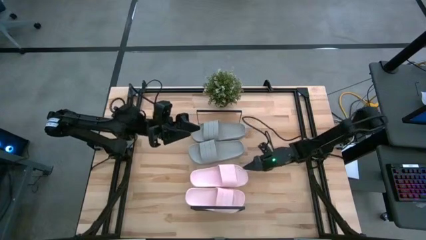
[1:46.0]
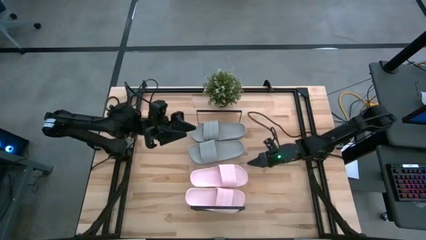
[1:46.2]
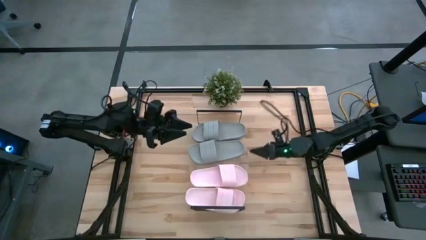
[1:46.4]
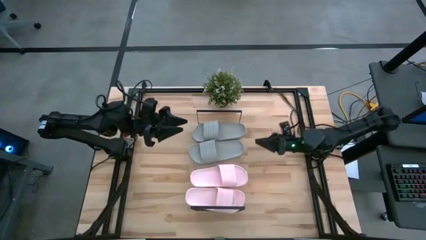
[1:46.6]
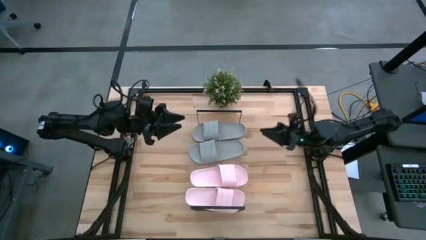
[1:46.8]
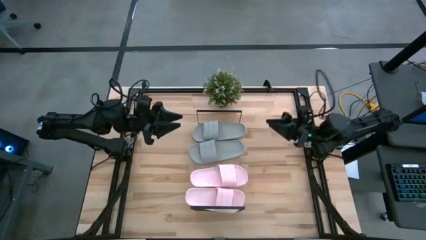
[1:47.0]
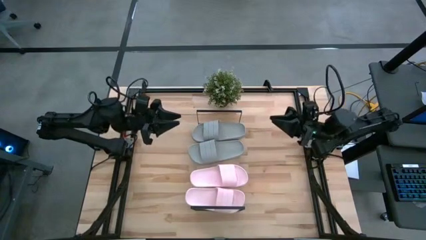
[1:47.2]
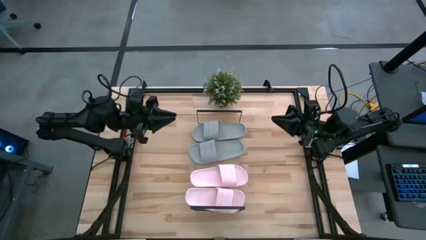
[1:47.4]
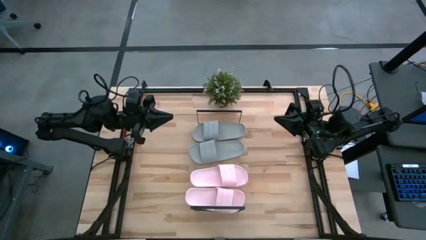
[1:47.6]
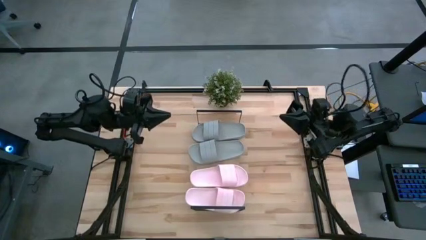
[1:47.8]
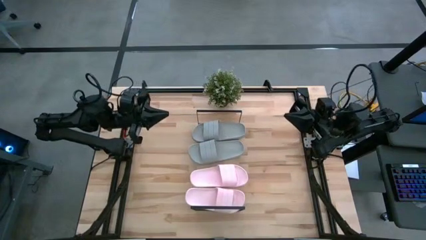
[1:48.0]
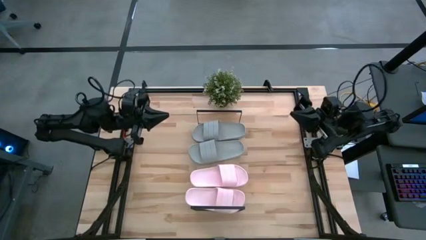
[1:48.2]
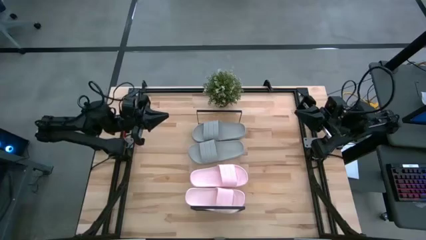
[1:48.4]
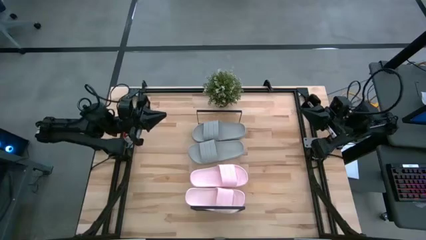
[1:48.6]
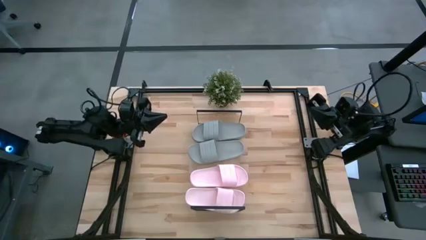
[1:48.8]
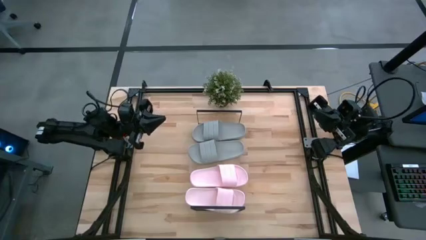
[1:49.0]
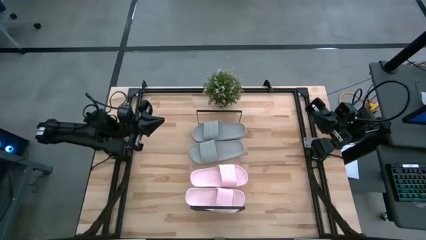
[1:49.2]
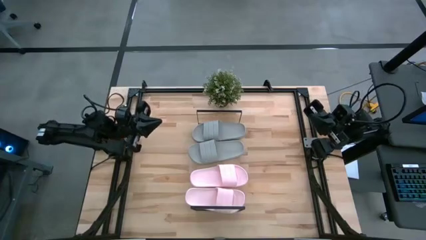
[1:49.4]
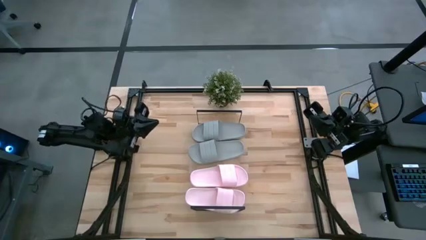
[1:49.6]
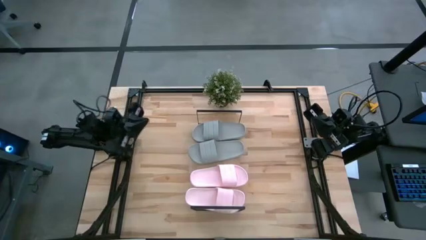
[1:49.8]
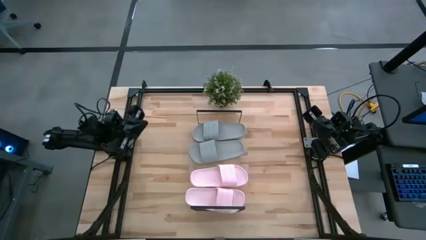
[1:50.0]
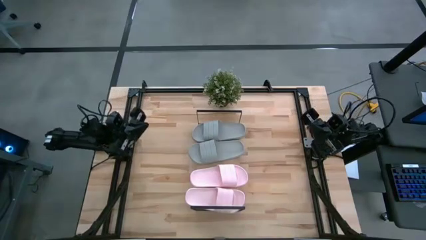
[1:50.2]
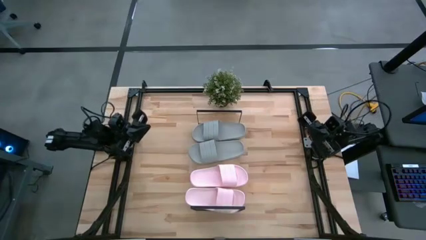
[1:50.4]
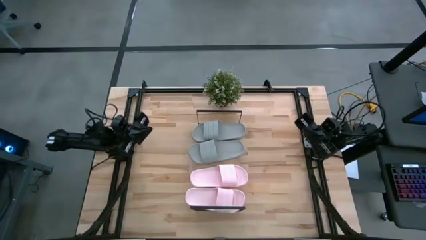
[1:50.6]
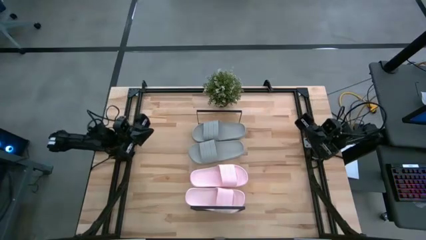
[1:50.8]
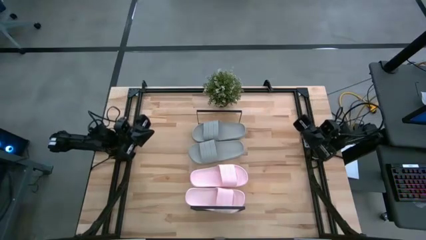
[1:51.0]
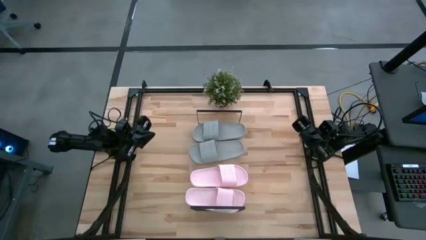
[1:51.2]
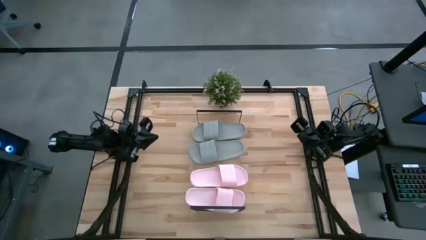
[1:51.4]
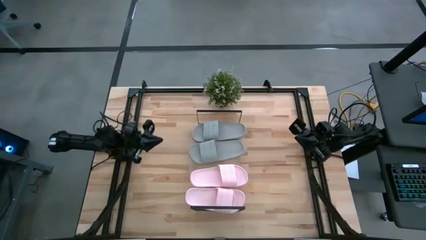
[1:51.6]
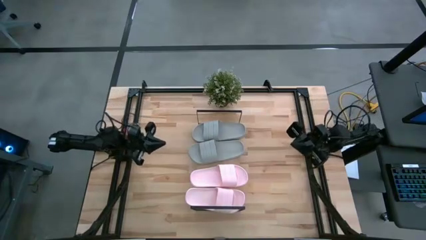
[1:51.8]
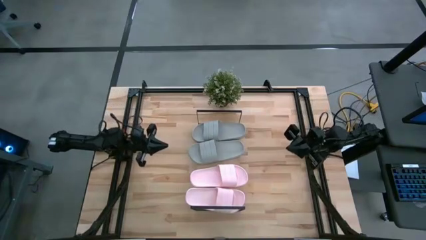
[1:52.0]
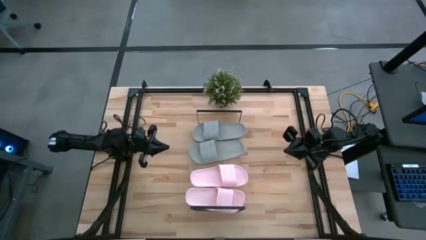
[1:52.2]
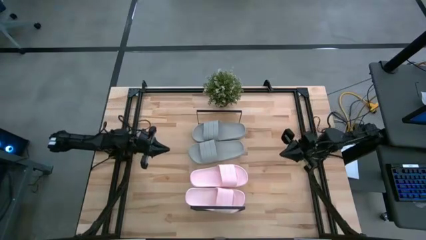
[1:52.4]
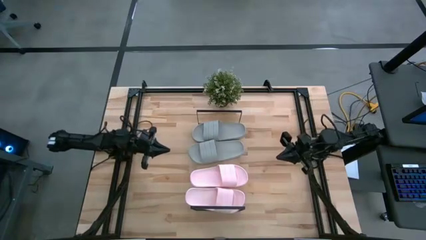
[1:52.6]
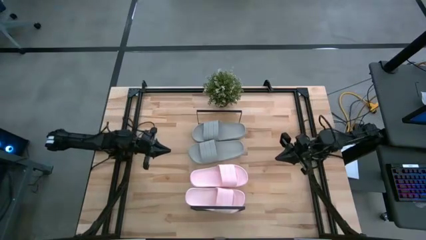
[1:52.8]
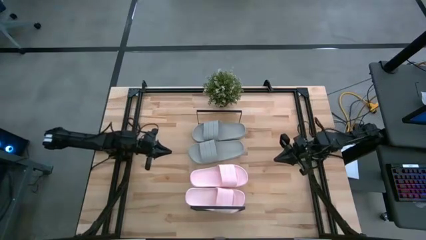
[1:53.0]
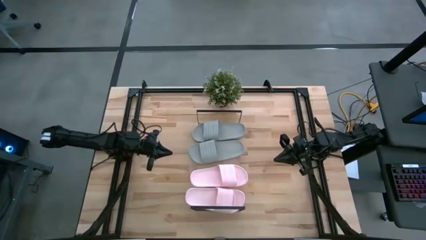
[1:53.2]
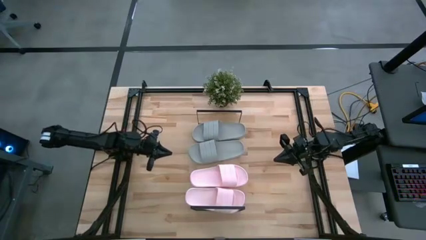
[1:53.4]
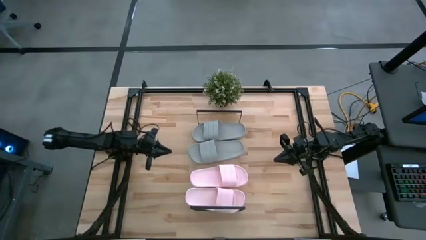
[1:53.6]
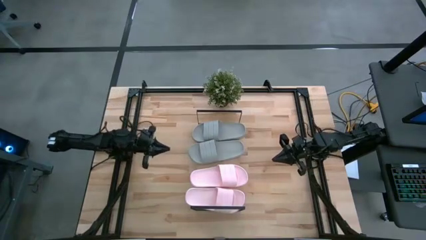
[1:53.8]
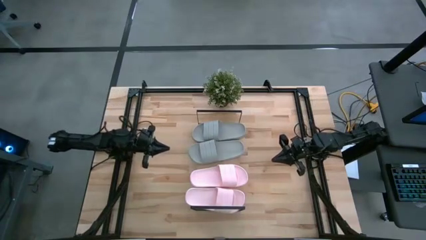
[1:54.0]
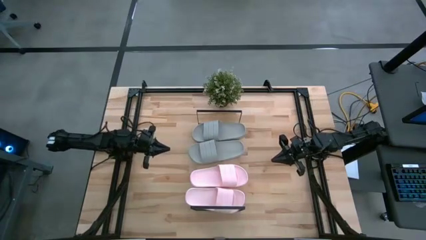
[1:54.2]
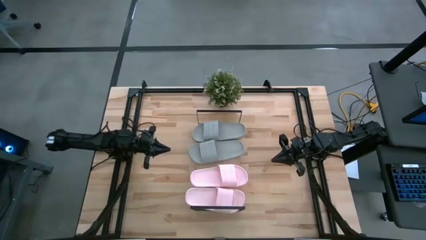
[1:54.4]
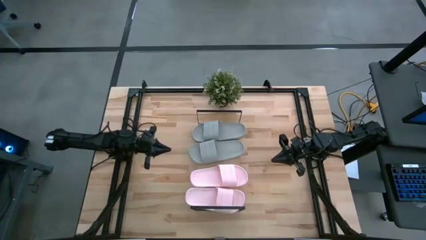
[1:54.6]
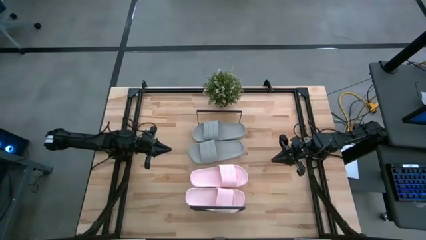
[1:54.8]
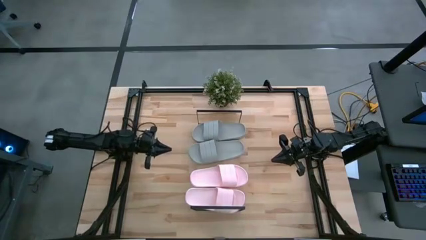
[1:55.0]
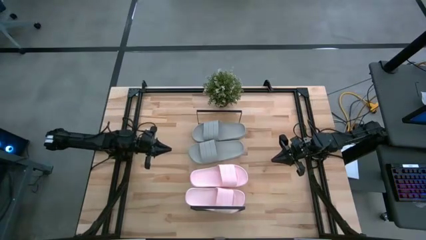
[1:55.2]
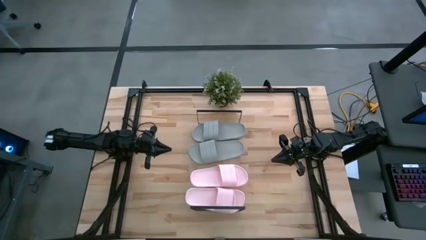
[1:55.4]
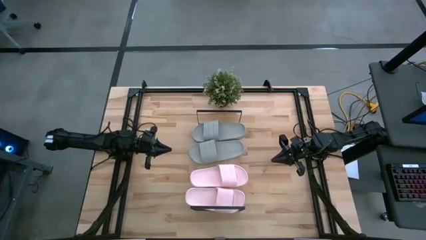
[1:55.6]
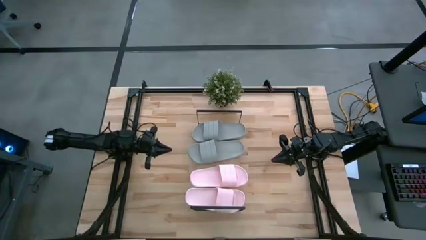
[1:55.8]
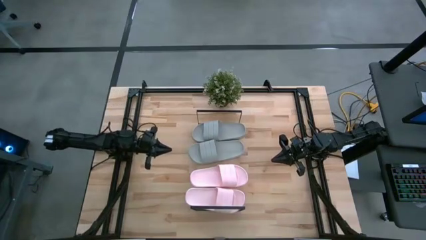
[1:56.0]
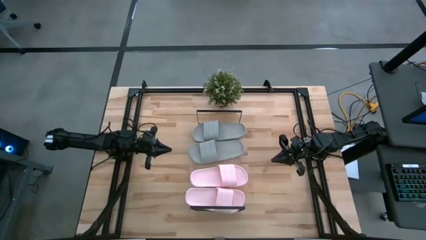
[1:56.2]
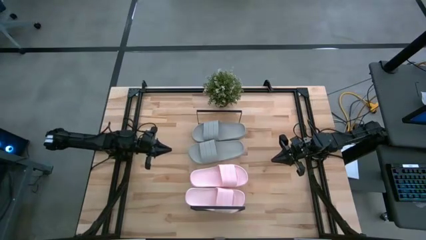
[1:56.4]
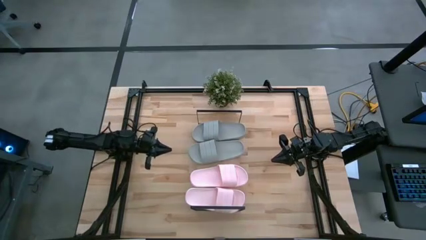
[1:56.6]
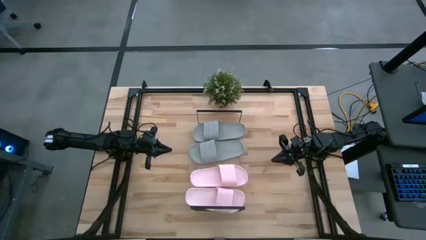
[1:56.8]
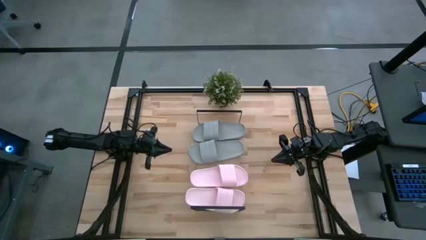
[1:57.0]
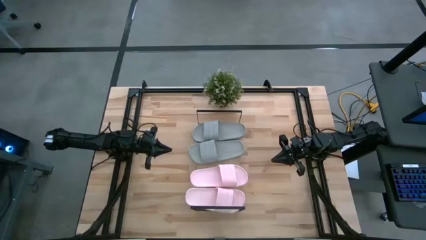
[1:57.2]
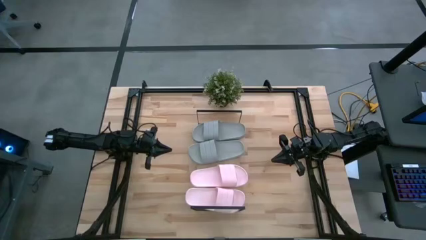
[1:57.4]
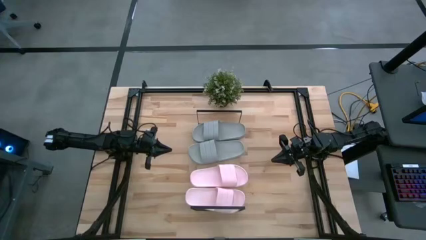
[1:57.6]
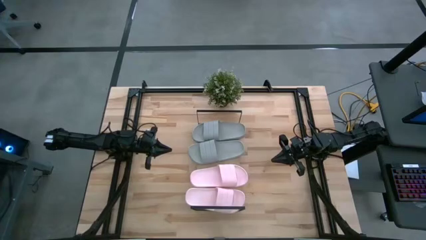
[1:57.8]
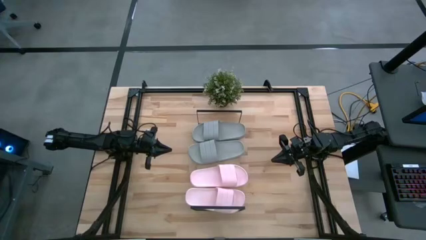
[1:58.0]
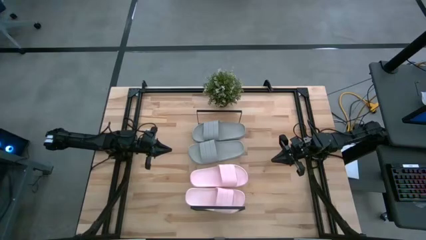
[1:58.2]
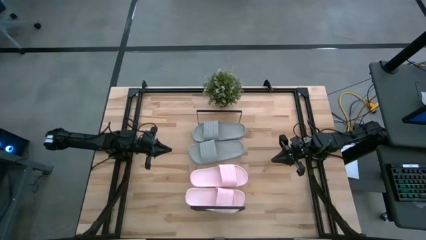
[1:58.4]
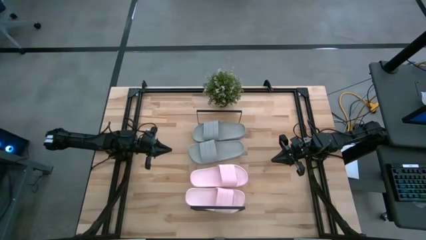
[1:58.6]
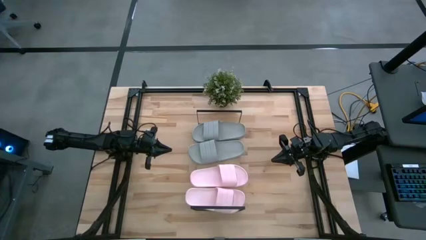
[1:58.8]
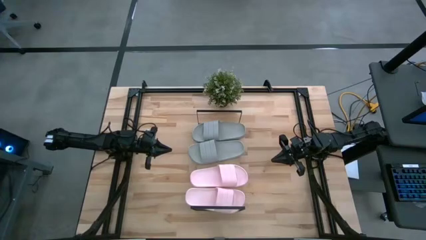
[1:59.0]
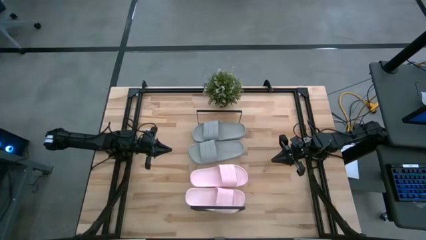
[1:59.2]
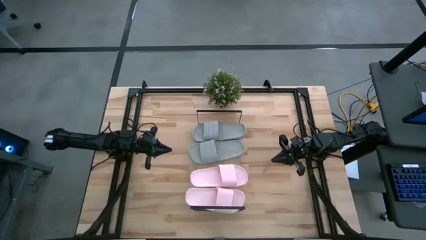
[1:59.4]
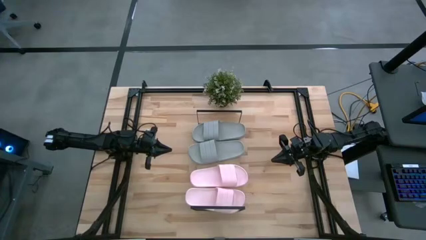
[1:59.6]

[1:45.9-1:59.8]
Task: Pick and place slides into the shelf
Return to Home Position

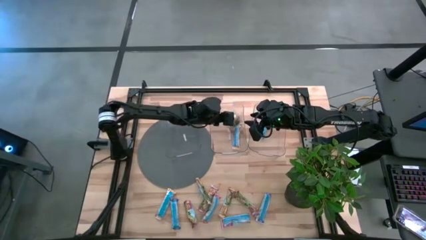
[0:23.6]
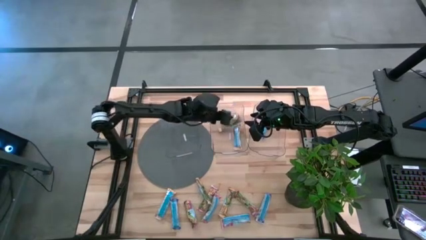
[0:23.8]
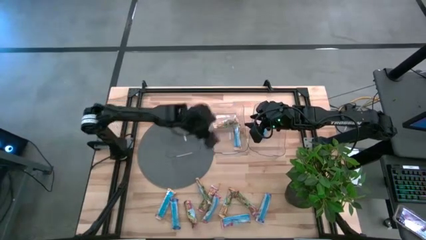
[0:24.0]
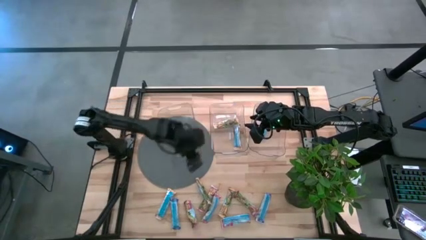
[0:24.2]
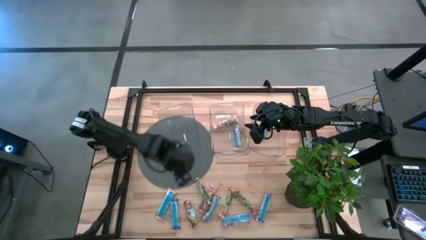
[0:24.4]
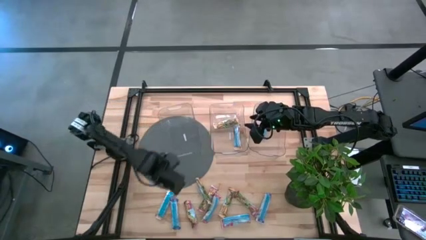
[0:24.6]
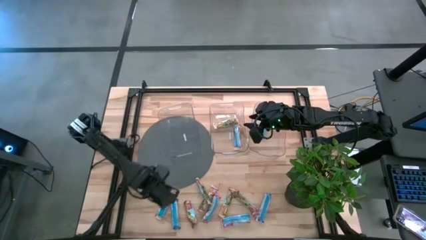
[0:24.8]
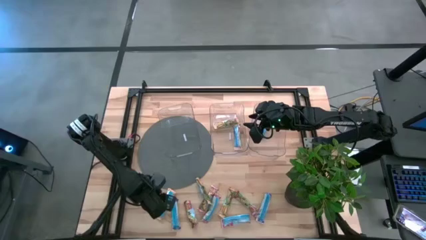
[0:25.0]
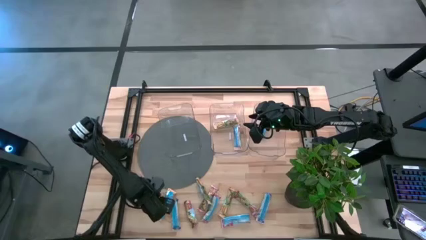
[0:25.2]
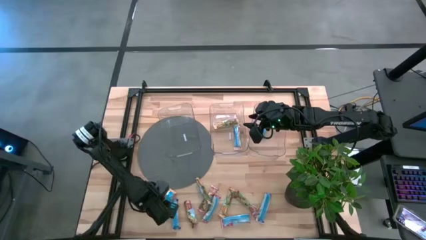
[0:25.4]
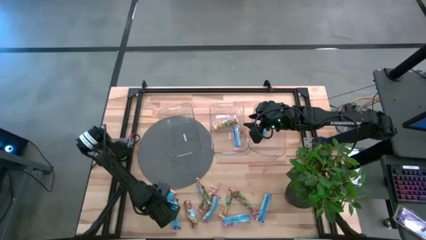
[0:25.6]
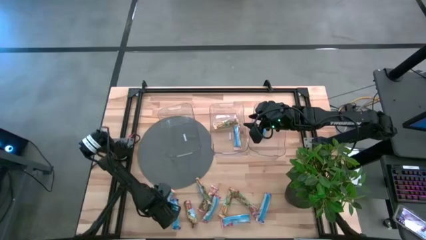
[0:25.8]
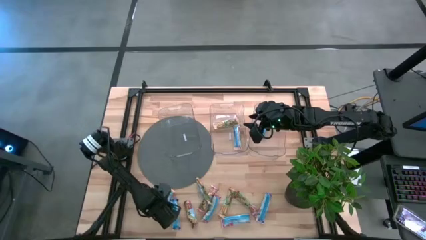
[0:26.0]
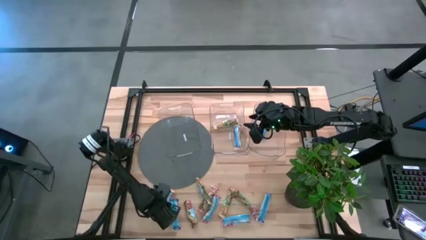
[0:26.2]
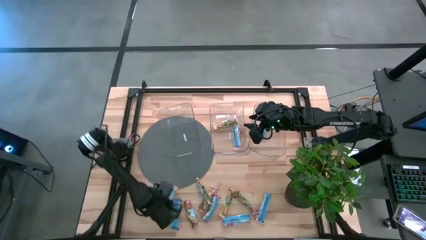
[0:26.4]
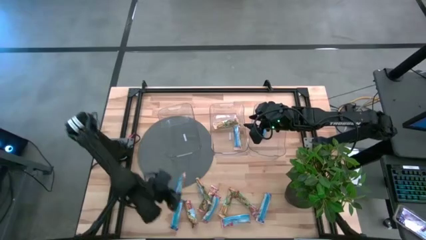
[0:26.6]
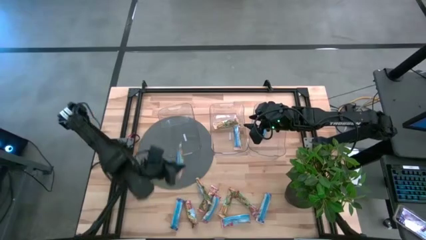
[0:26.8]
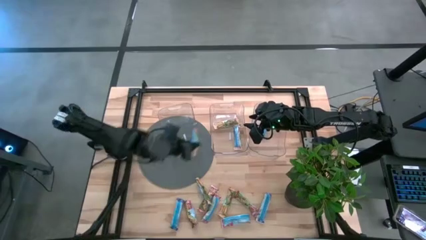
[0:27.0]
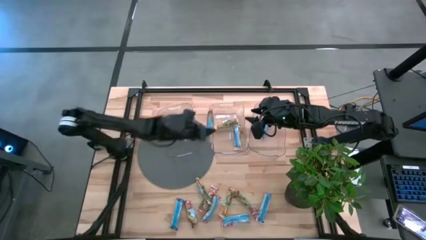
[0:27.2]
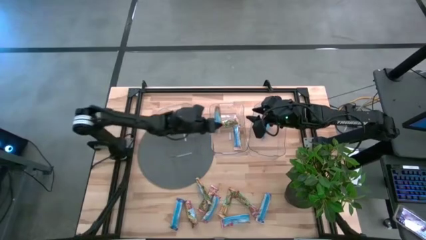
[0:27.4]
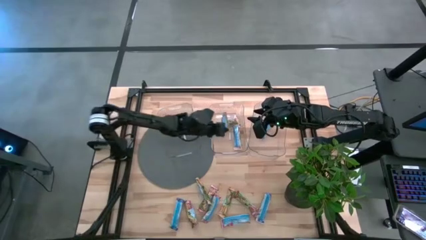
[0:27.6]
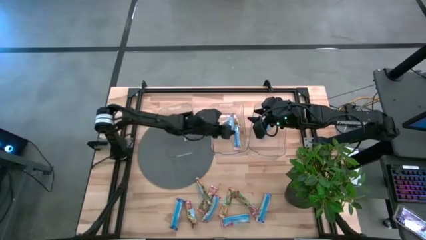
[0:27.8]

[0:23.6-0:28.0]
Task: Pick and place Granola Bars by type
Put the yellow granola bar into the middle transparent bin
